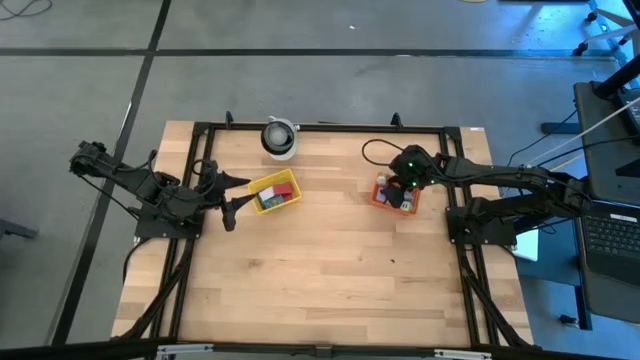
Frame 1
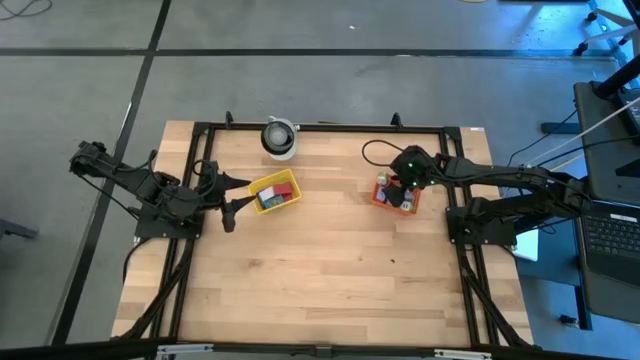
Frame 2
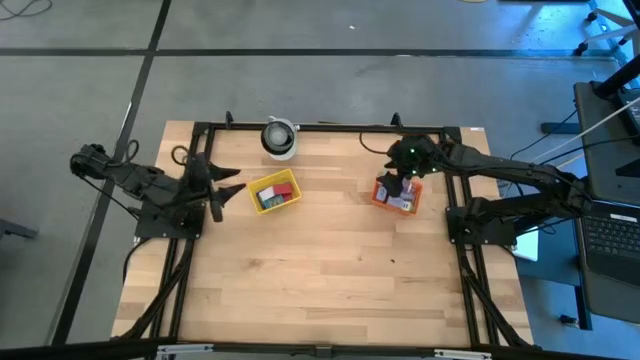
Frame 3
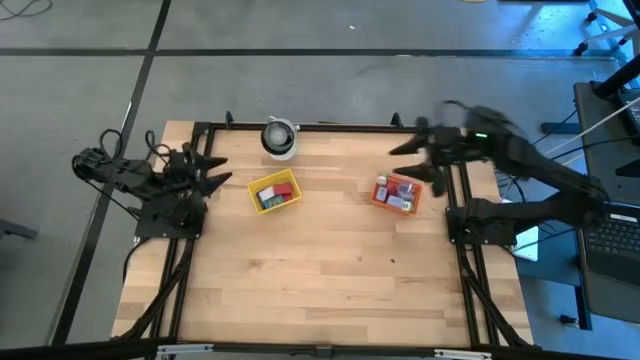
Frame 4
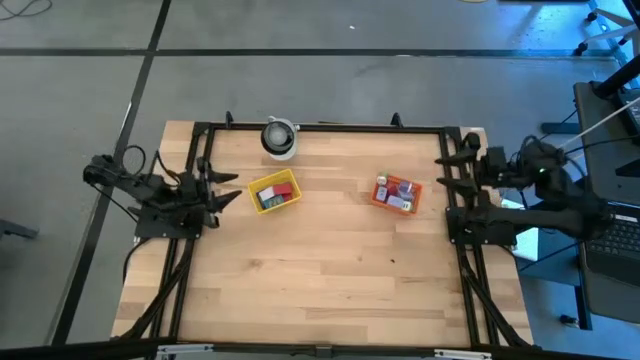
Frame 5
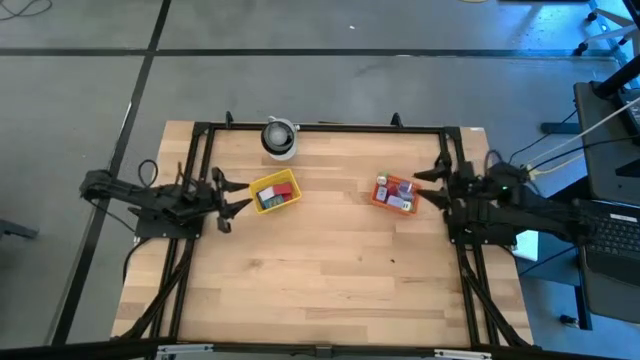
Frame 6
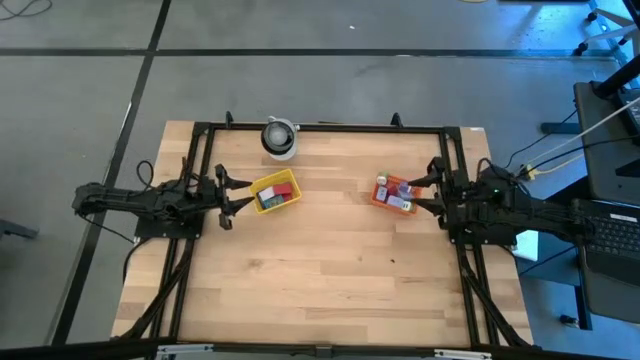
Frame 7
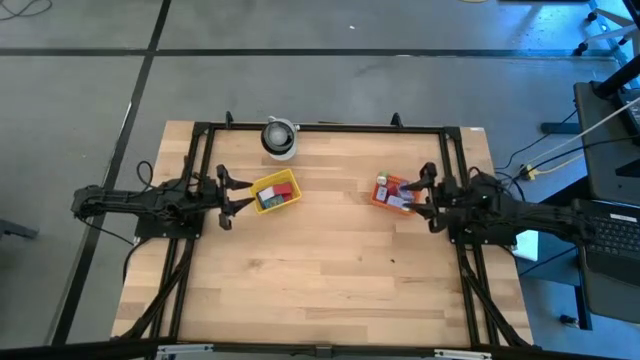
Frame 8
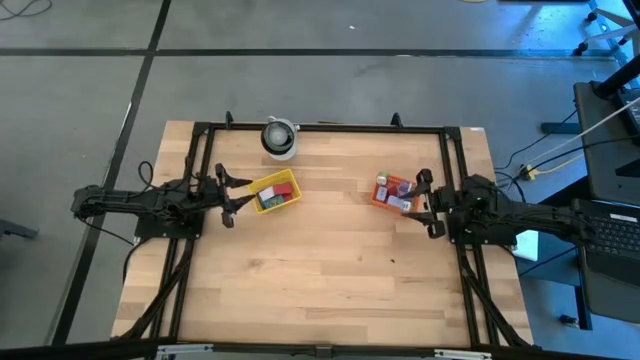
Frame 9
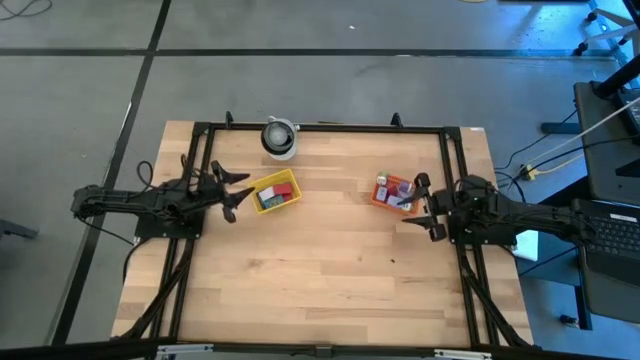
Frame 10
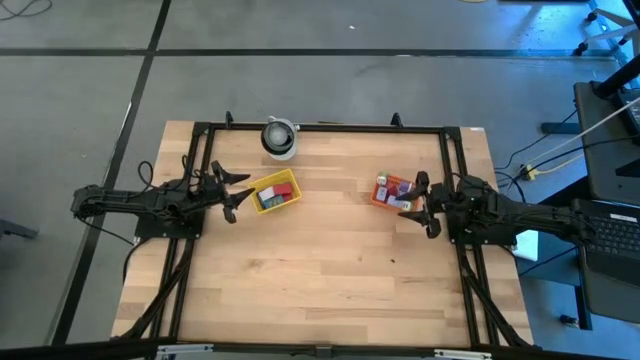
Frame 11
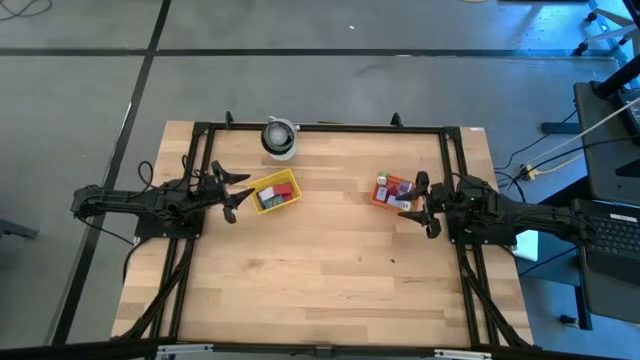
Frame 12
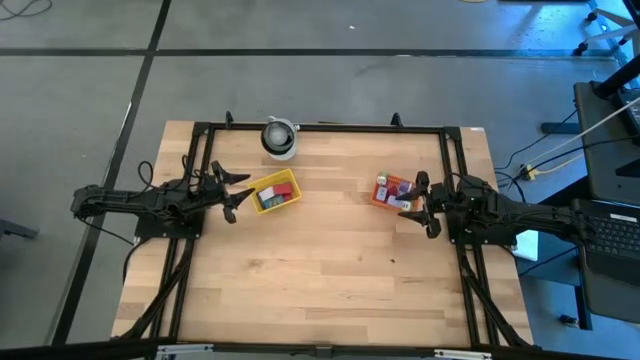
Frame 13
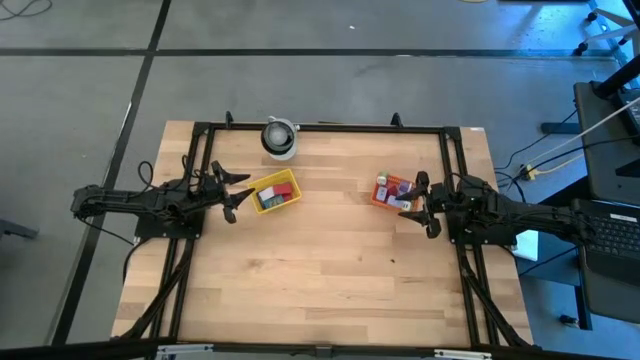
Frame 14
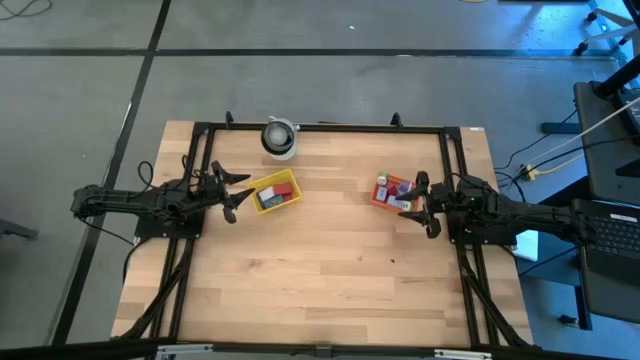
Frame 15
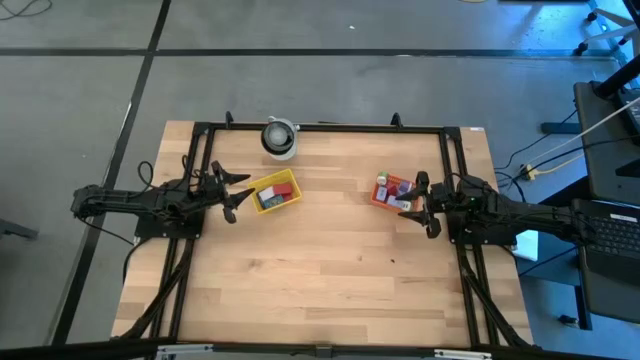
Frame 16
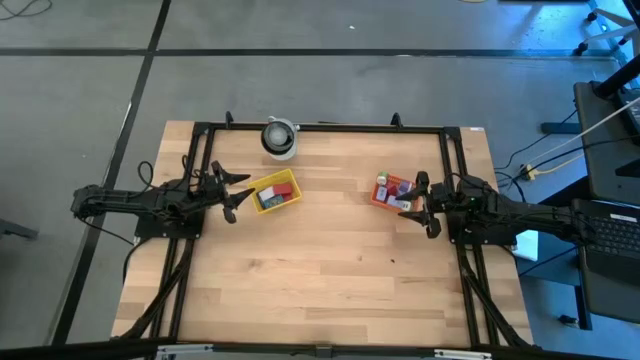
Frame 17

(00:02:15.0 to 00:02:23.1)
Task: Pick & Place Office items
Return to Home Position

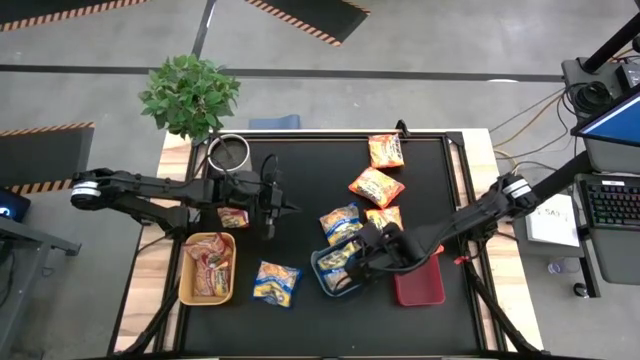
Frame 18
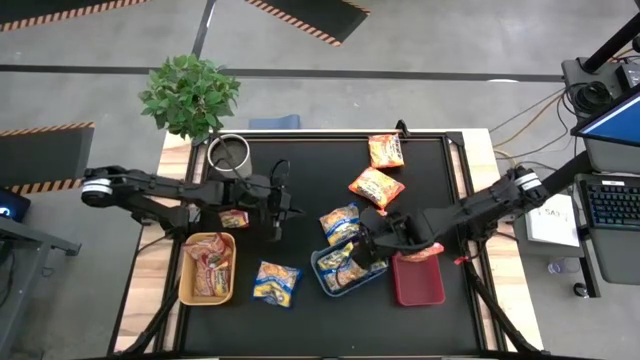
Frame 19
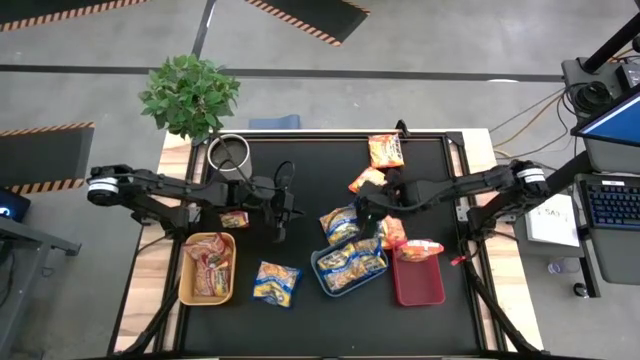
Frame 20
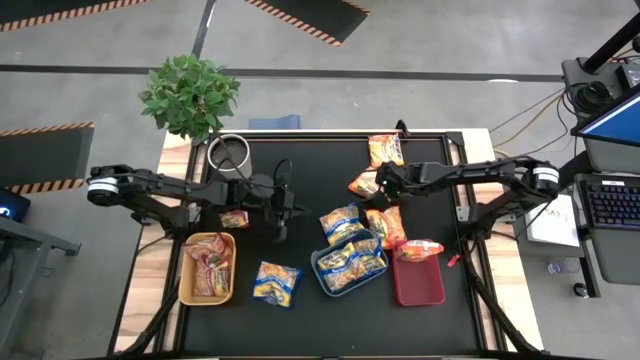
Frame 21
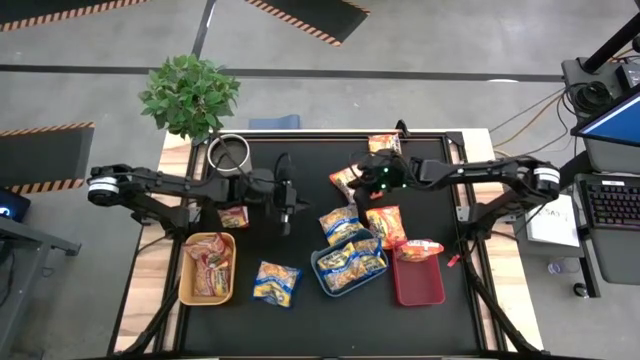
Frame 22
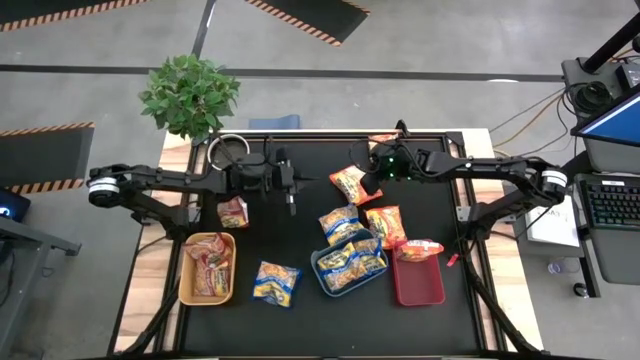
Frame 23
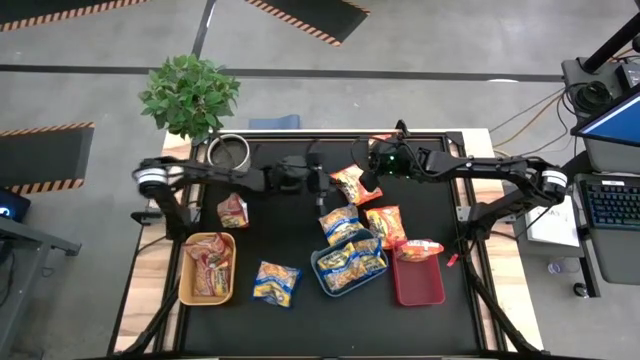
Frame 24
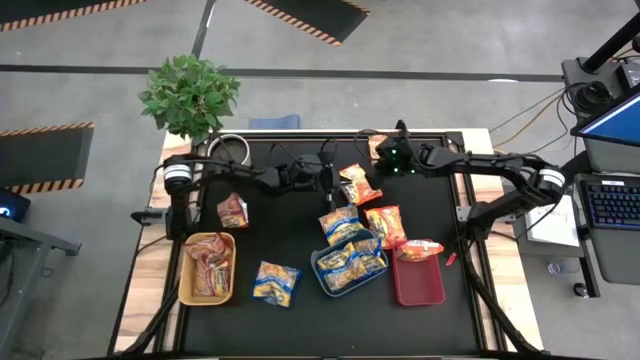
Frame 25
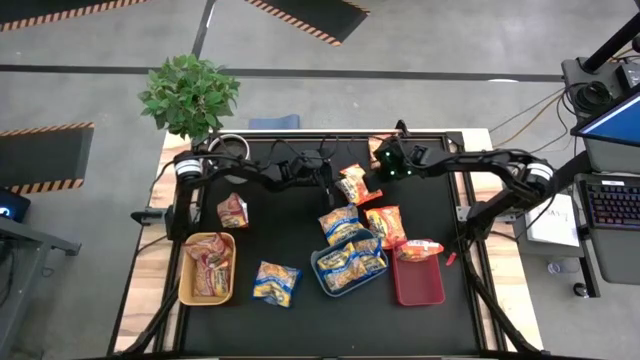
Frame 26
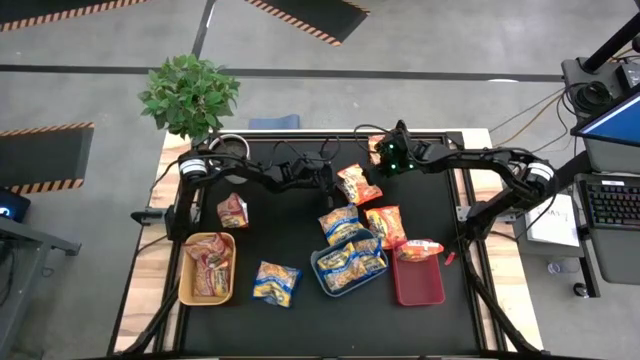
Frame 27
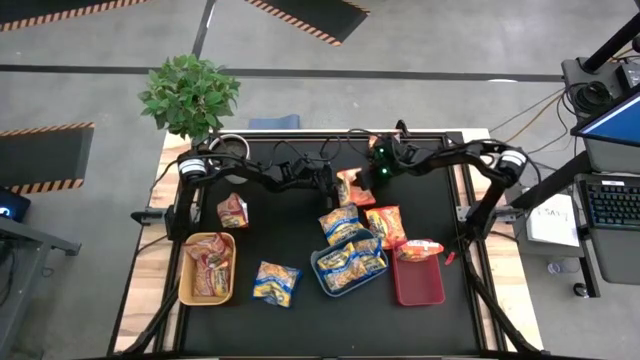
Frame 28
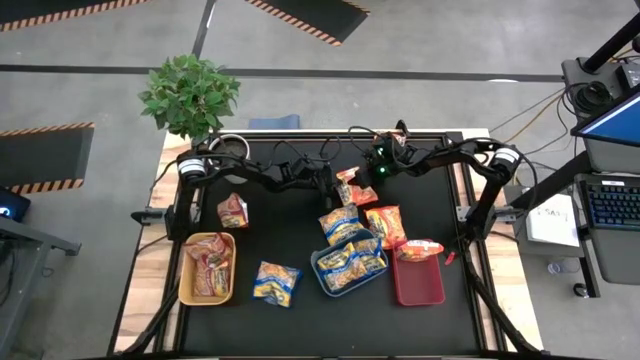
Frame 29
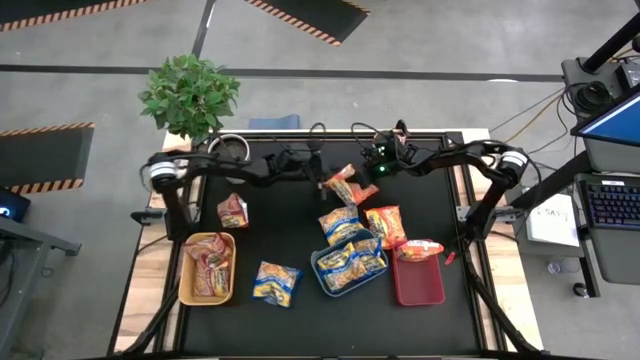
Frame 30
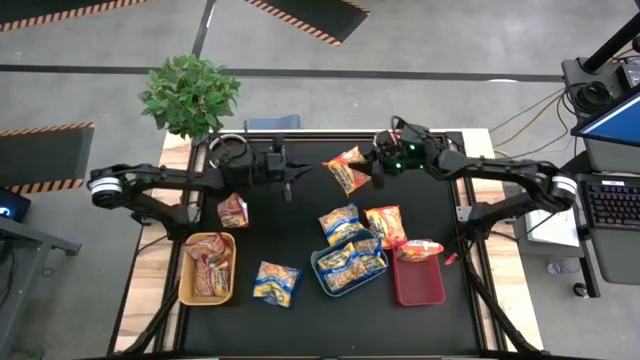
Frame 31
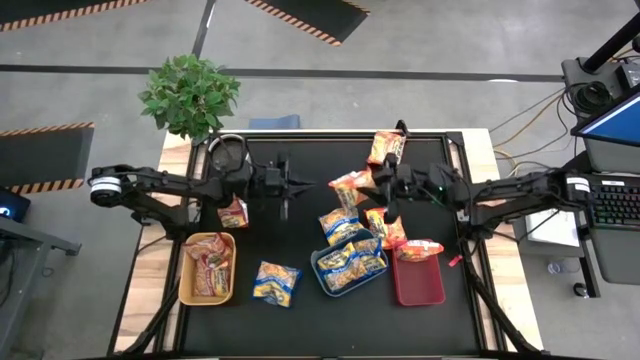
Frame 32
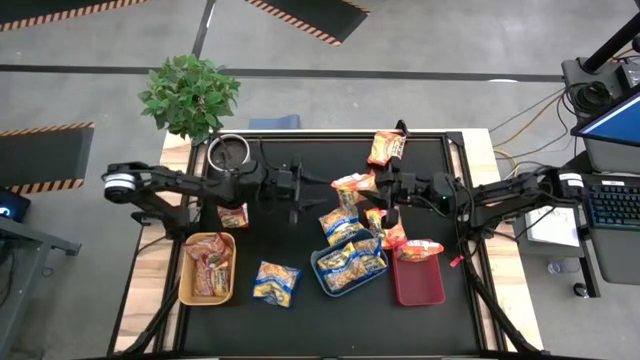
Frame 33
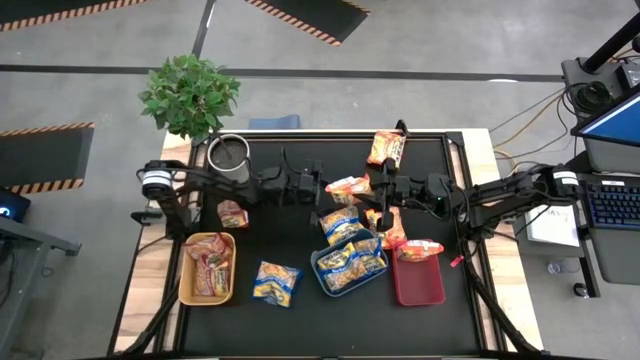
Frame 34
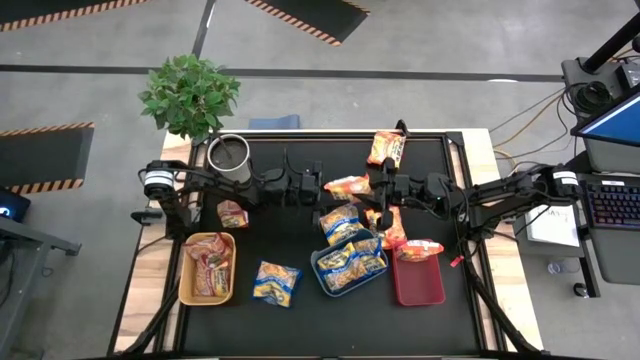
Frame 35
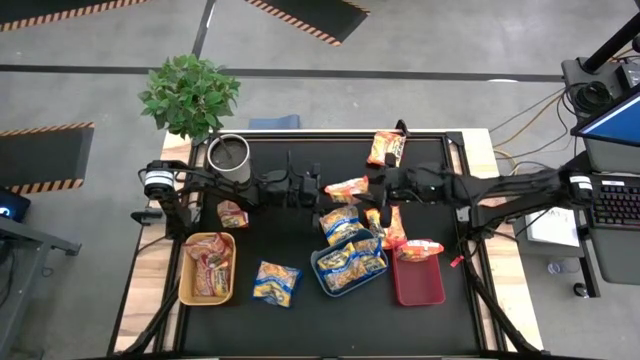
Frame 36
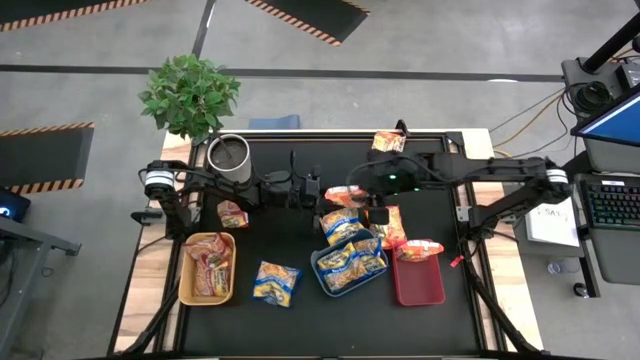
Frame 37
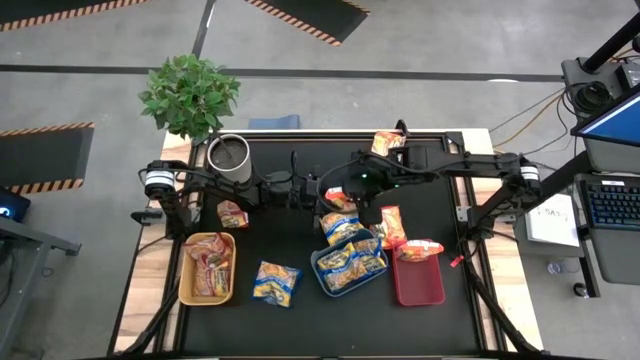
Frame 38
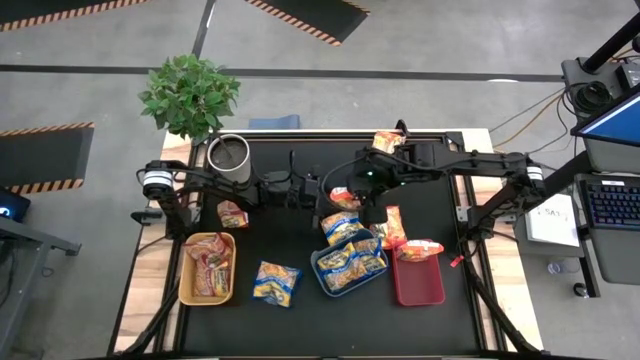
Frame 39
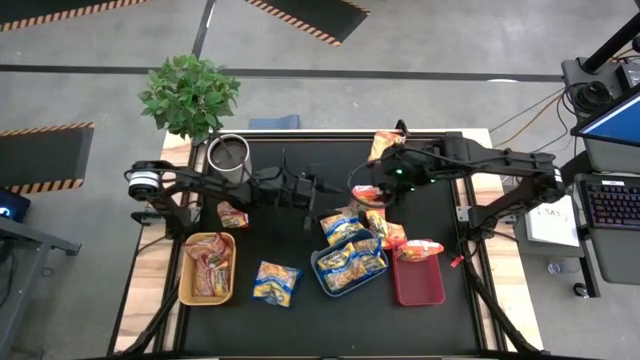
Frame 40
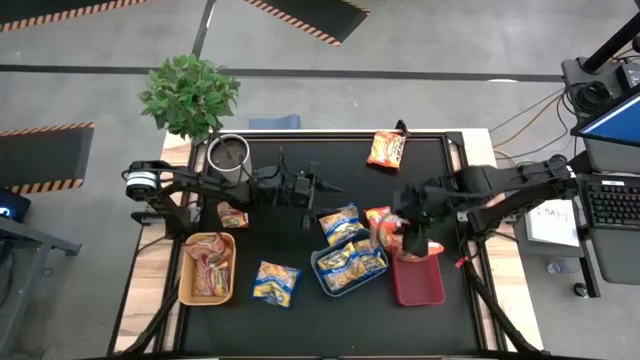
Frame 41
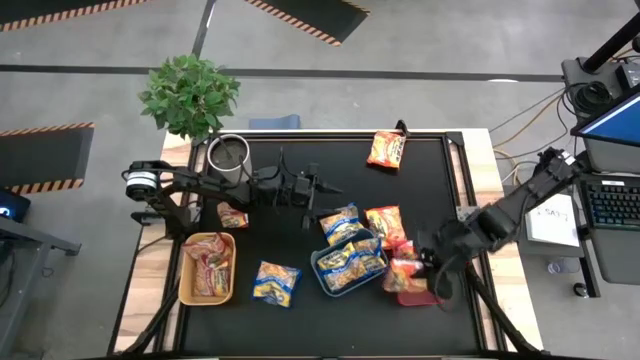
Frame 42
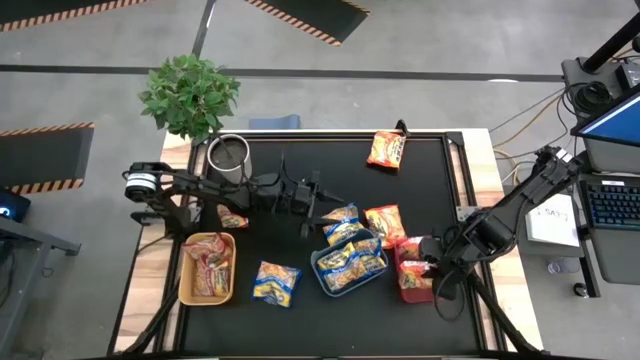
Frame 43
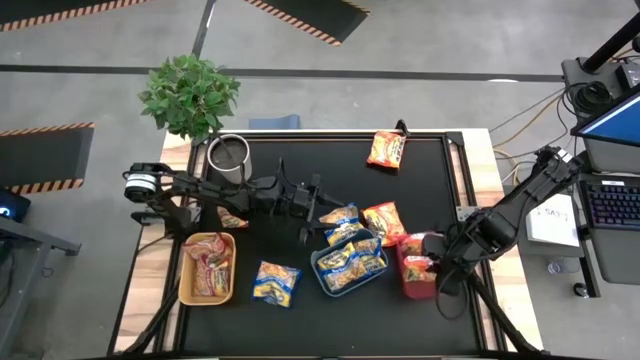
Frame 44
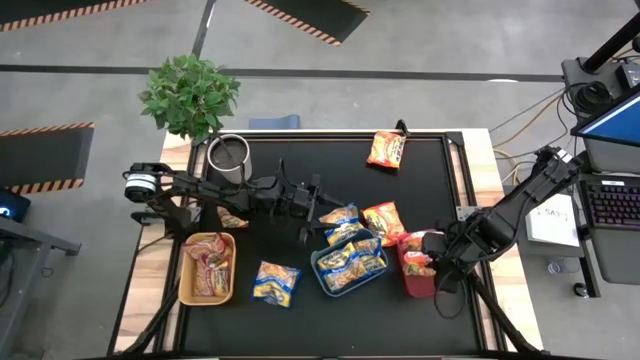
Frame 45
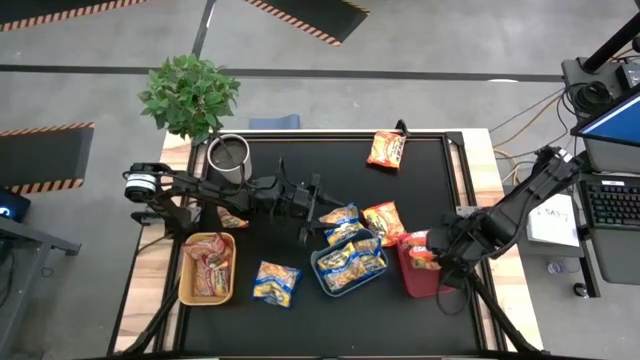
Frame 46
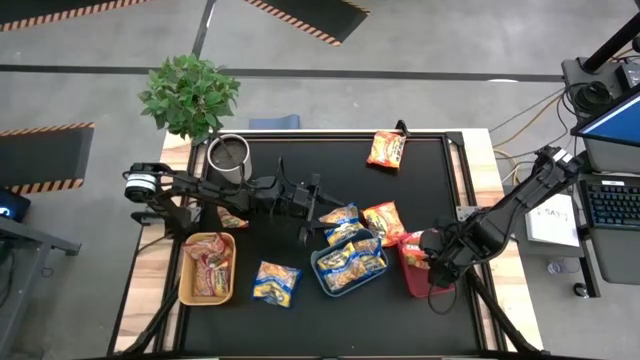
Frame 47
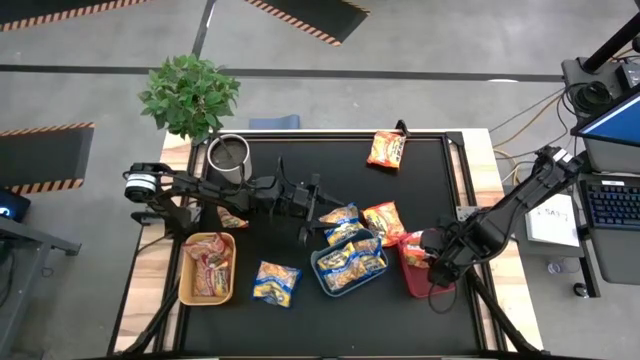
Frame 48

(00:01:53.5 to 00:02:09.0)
Task: Sort Maruchan noodles
Put the middle orange noodle pack into the red bin
